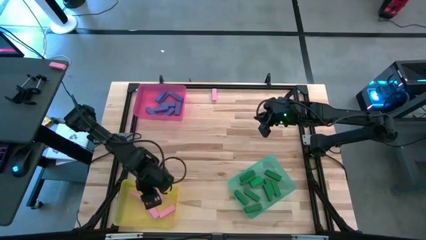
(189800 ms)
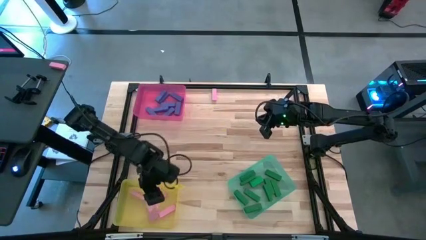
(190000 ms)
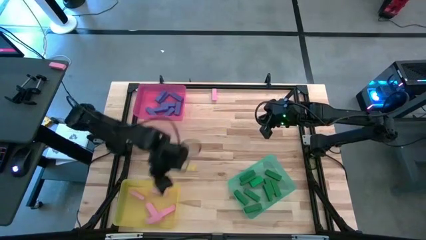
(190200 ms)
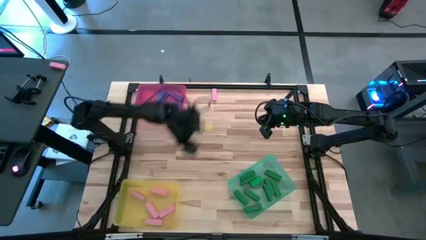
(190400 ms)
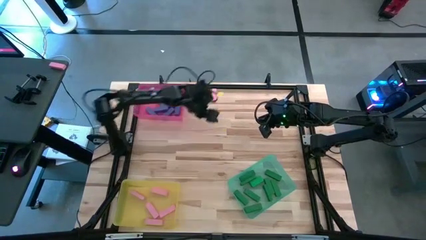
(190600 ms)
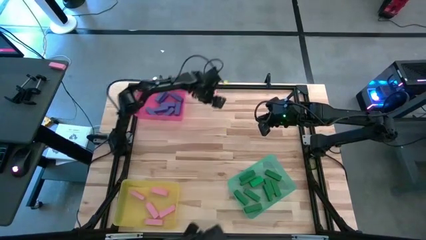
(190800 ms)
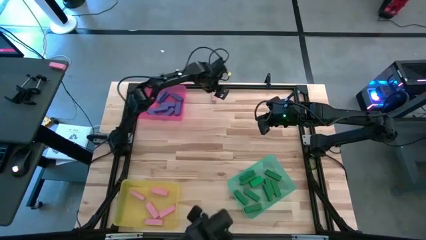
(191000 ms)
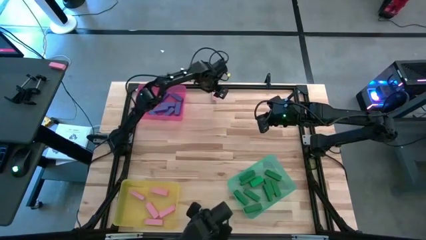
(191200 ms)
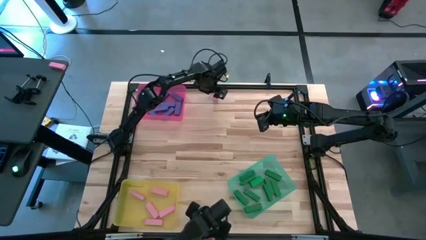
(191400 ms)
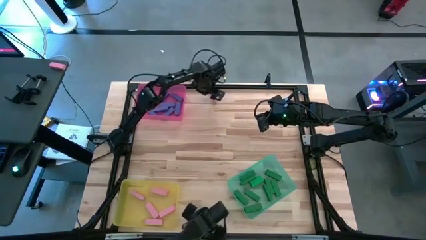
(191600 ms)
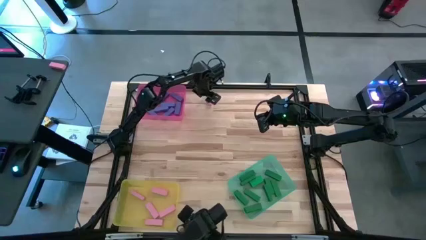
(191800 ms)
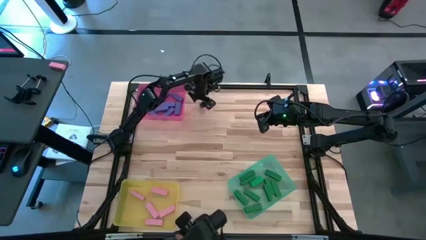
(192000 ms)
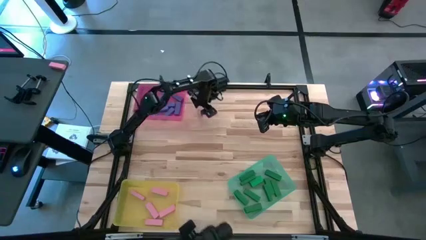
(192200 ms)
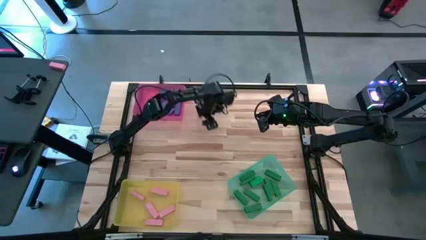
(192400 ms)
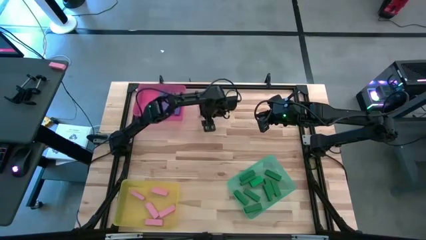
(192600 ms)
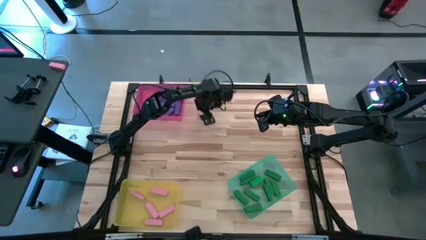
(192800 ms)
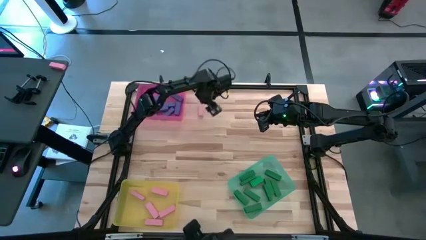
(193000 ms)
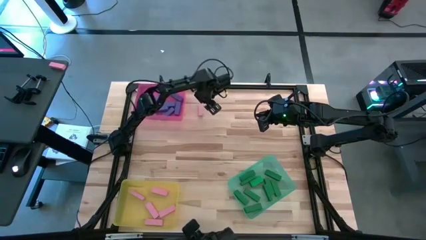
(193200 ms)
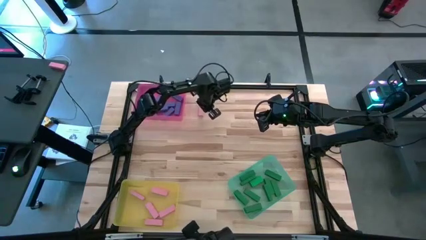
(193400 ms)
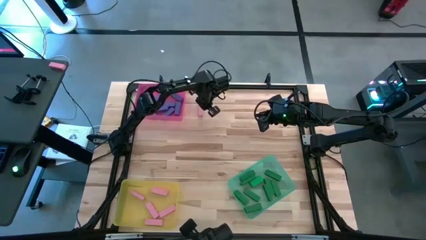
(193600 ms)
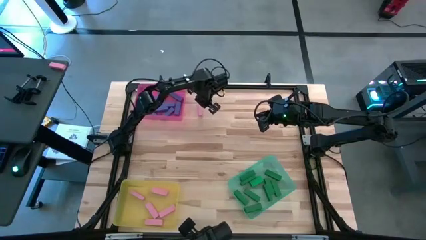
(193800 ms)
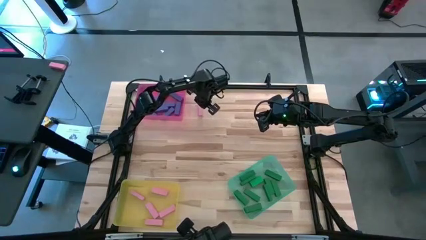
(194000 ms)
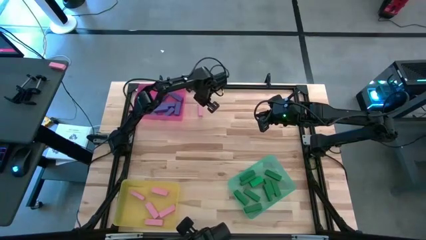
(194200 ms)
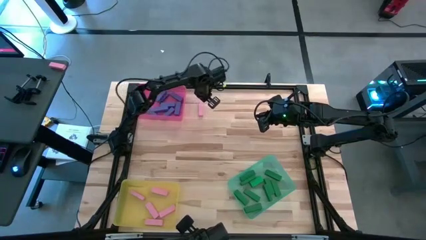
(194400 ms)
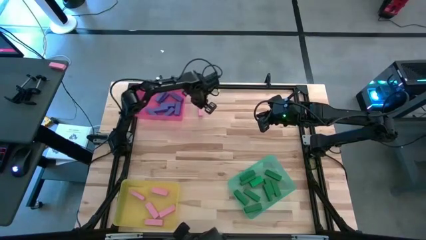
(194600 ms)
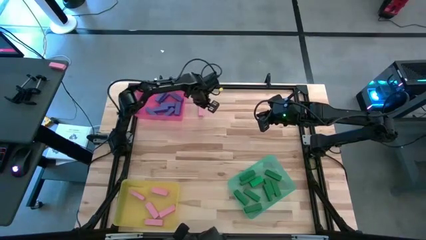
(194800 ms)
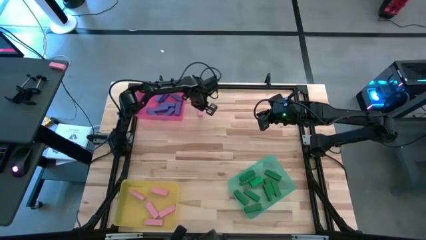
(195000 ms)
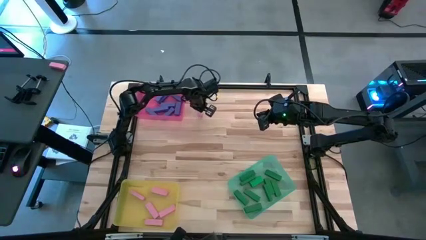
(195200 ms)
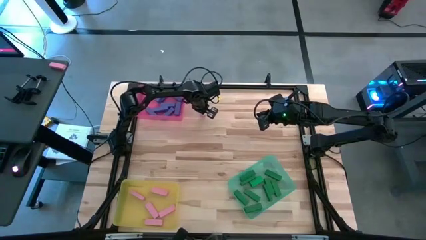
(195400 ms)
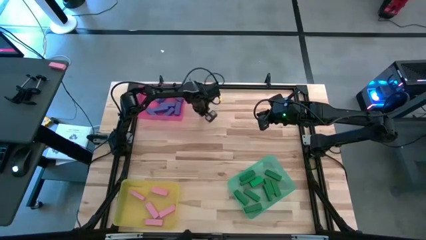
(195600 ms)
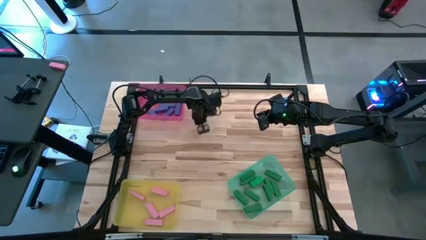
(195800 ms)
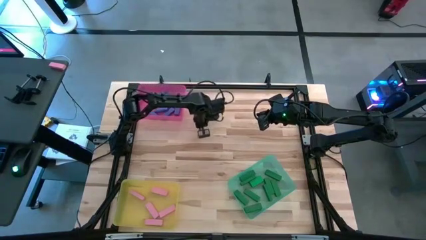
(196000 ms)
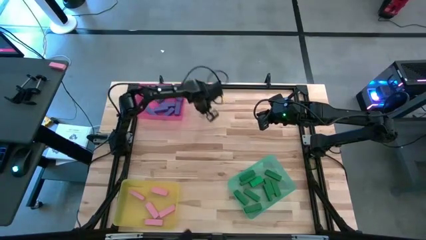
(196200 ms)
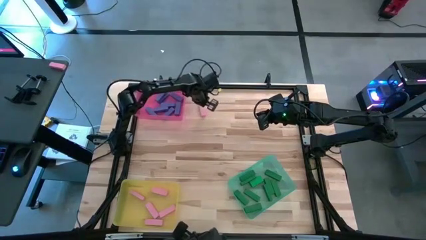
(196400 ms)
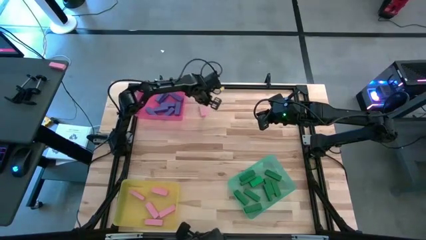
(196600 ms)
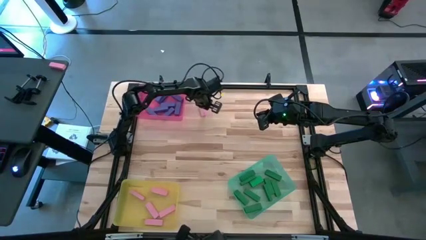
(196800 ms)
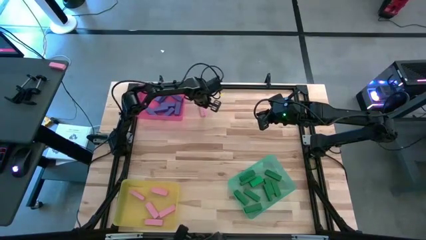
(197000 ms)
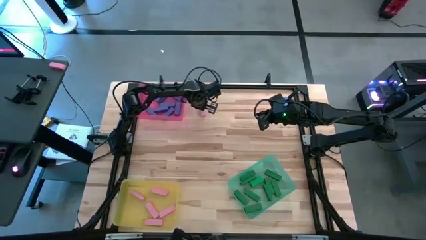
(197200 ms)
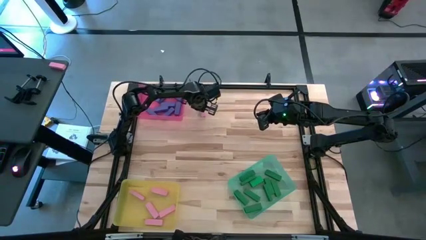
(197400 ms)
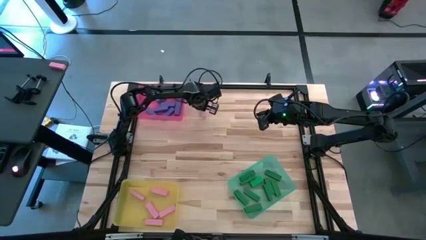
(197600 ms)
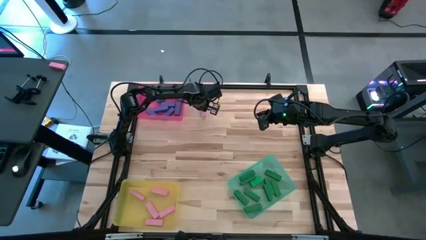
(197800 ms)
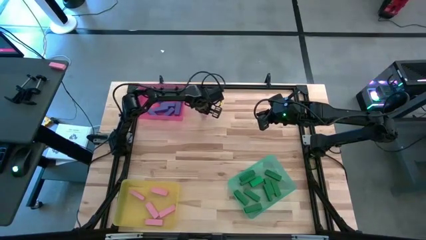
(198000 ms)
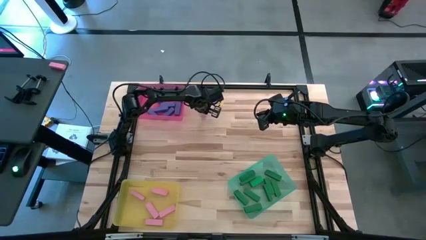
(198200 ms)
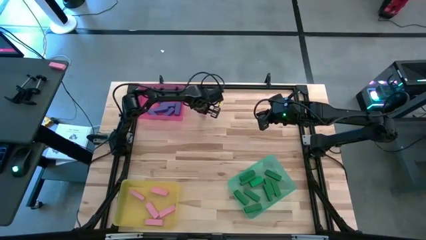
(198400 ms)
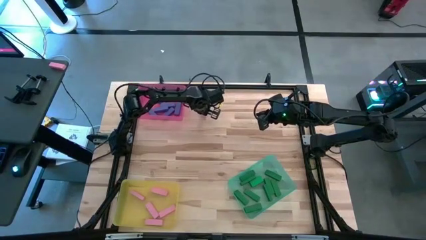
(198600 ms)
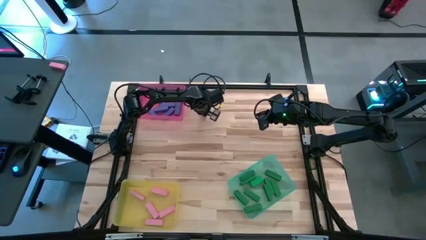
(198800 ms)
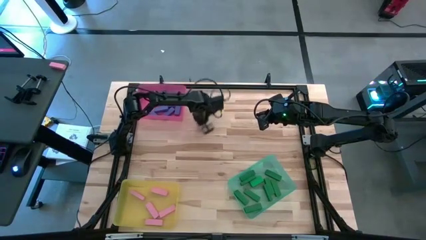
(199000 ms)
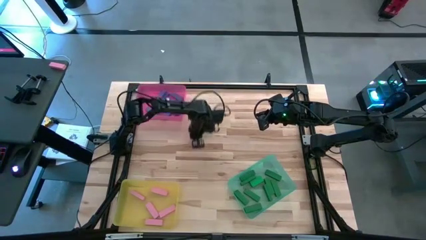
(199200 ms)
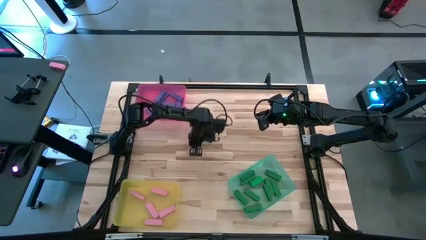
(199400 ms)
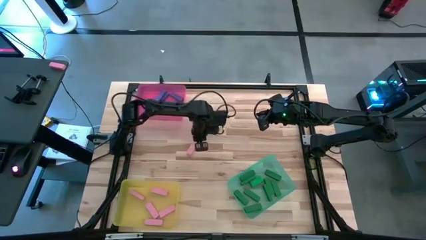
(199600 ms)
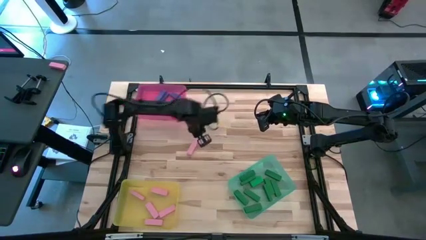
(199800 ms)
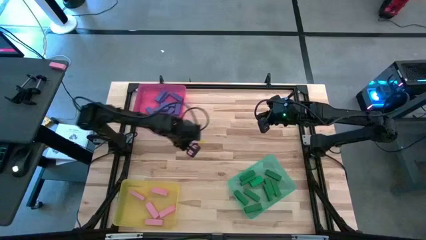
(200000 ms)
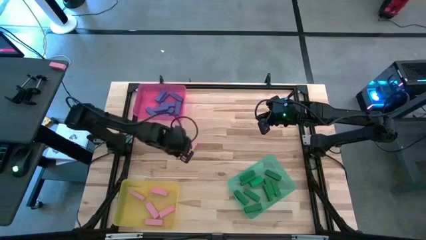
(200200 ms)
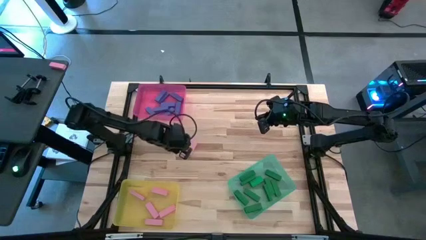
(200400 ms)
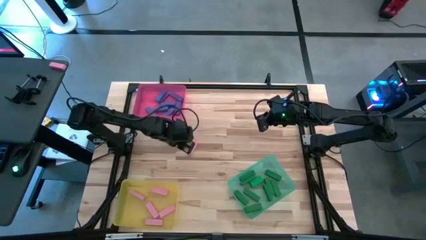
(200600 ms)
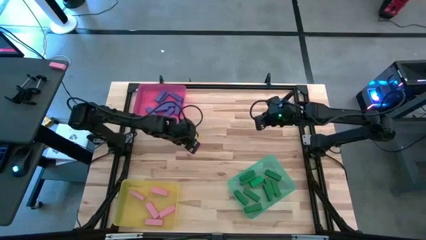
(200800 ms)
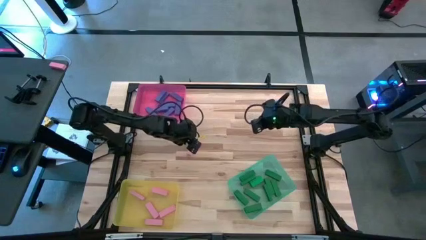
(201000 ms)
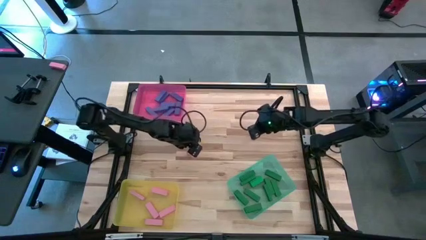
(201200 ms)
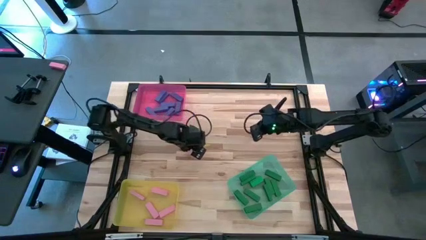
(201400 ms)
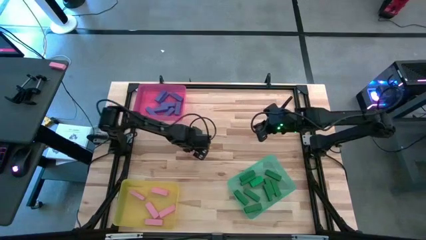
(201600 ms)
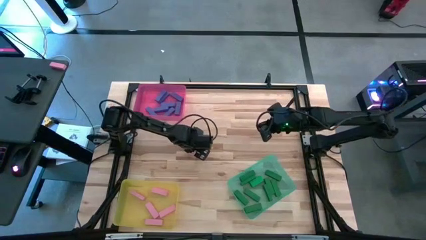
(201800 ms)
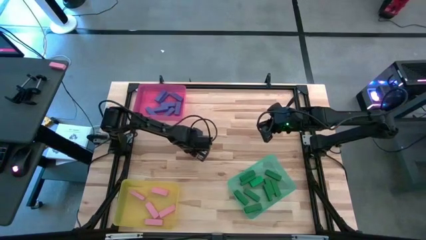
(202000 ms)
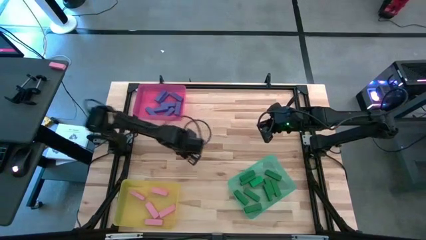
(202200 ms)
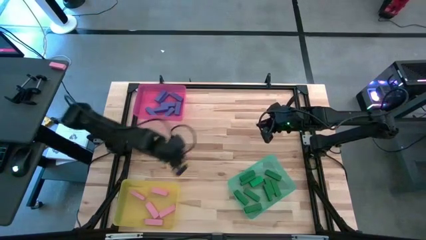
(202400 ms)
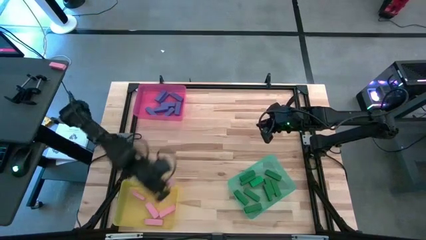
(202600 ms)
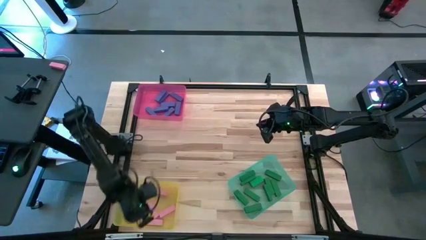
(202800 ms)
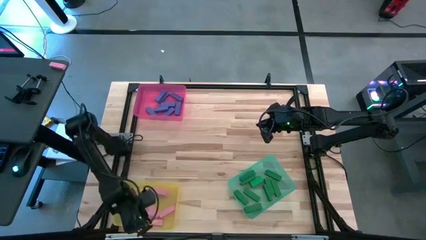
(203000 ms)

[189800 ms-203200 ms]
Task: Sort blocks
Put the pink block into the yellow bin
